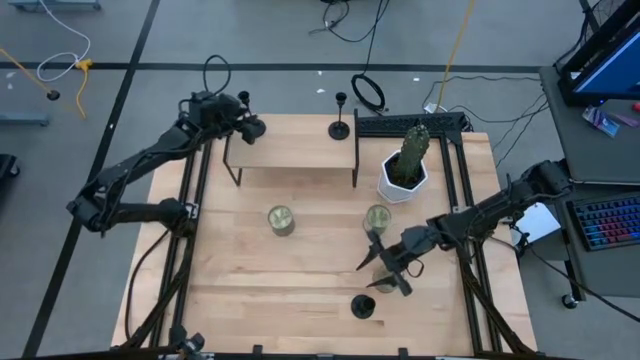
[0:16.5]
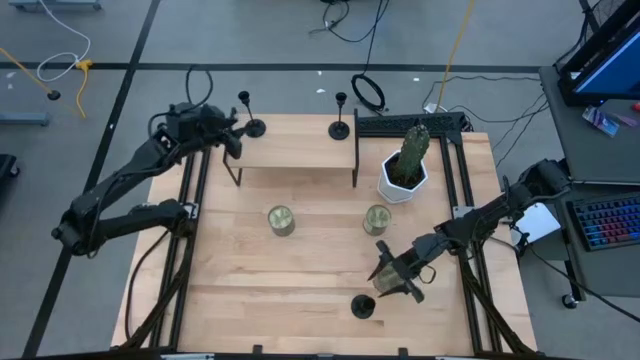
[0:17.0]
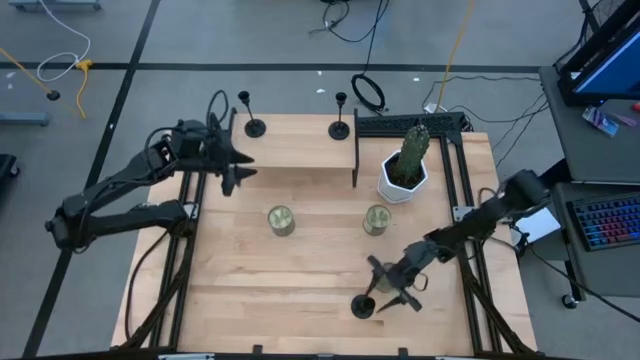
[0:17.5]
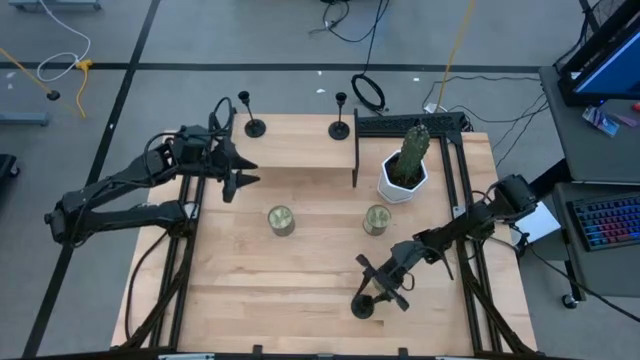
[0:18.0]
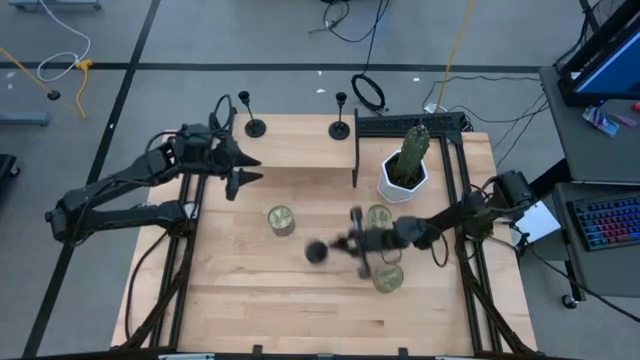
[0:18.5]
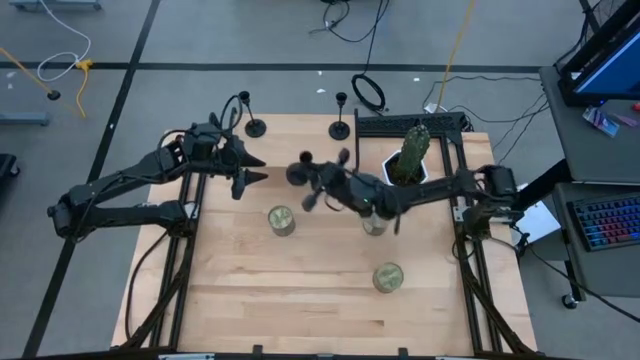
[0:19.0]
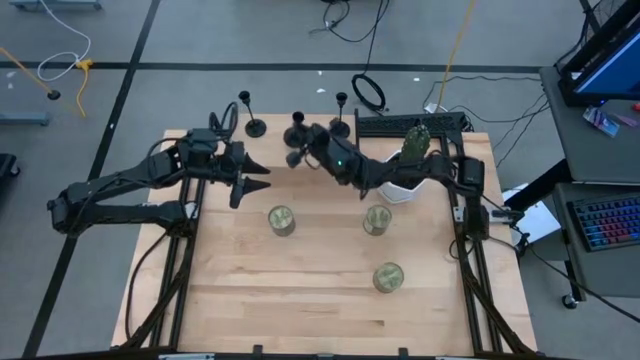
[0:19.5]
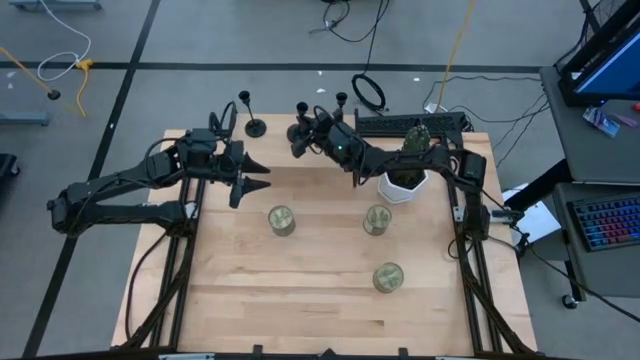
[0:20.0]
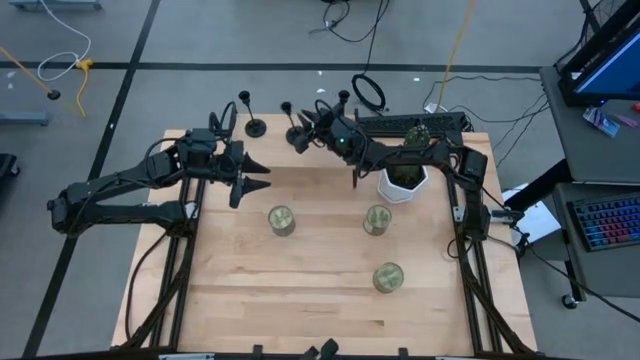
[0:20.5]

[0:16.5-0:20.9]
Task: Pick & Place candle stick holders
Put the black candle holder on the shelf

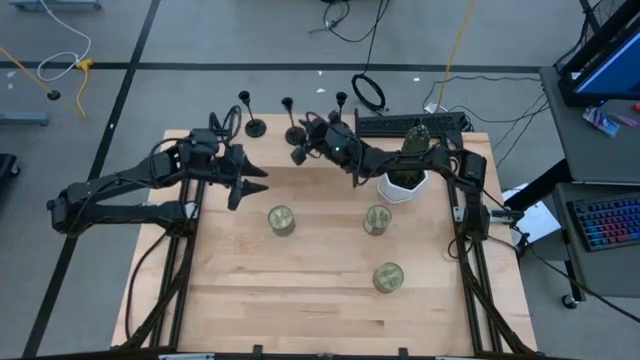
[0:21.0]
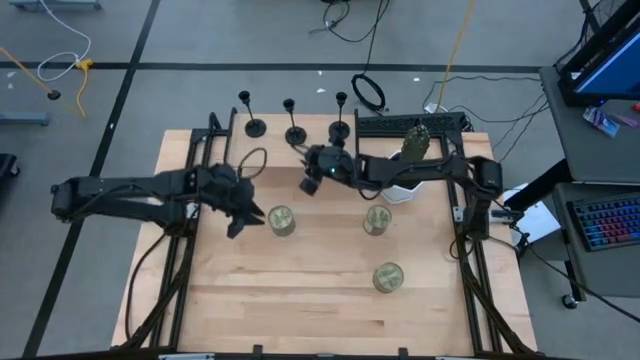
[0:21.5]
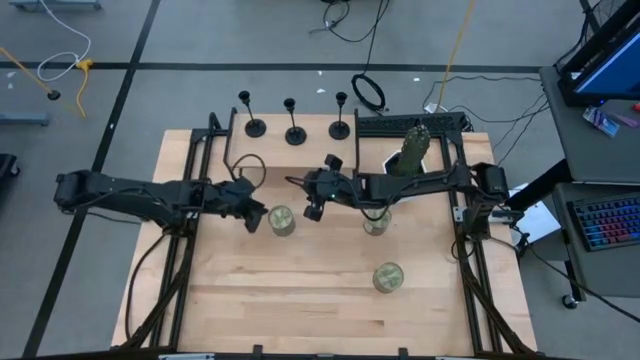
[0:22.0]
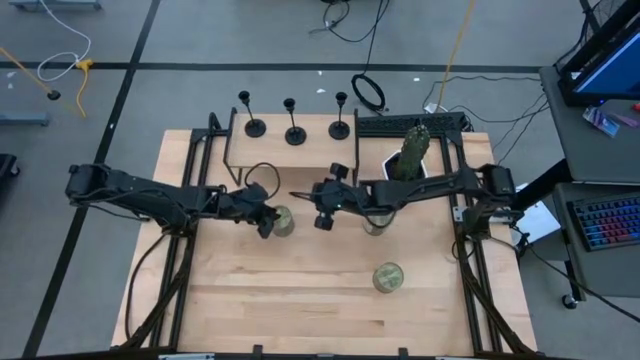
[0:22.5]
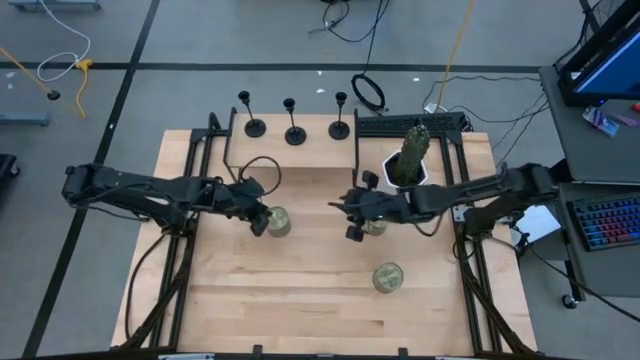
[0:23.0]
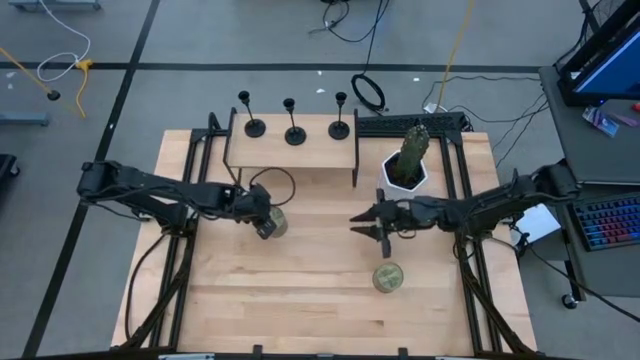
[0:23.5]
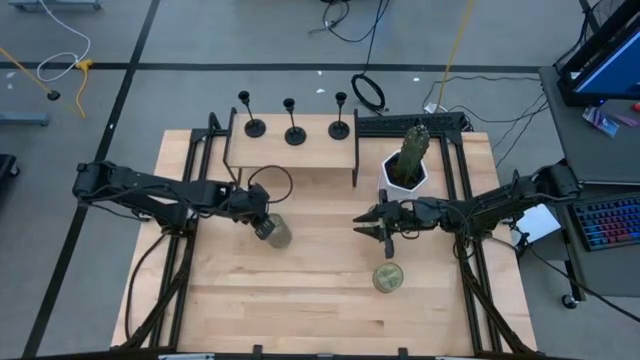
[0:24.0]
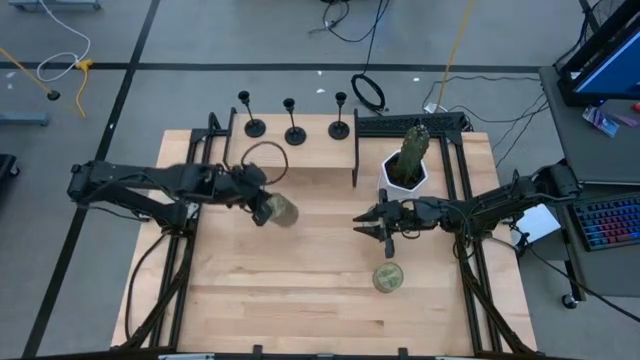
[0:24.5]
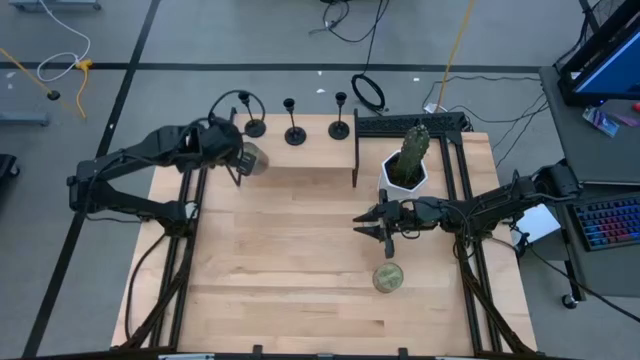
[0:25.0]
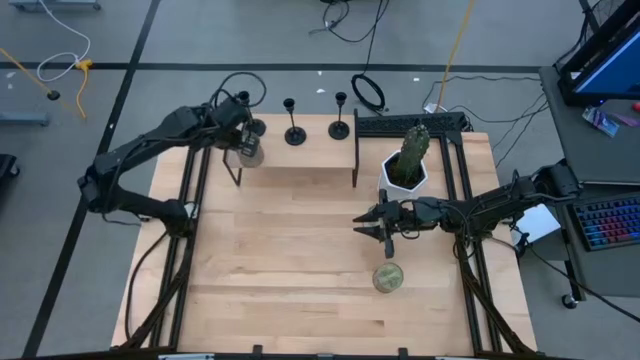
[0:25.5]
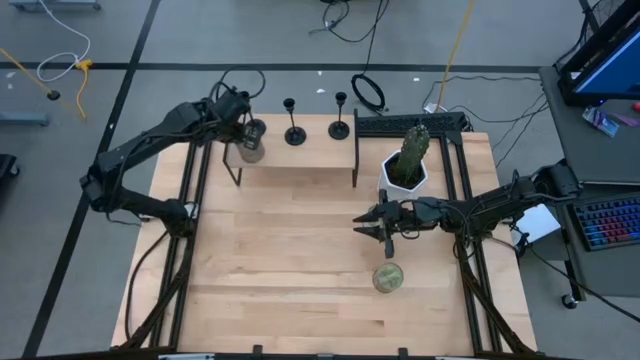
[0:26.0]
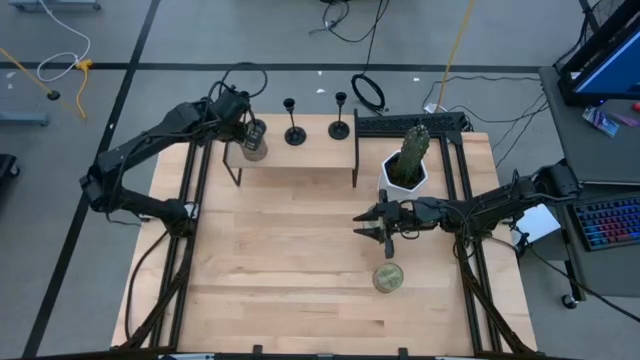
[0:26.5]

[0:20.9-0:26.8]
Put the scented candle on the shelf

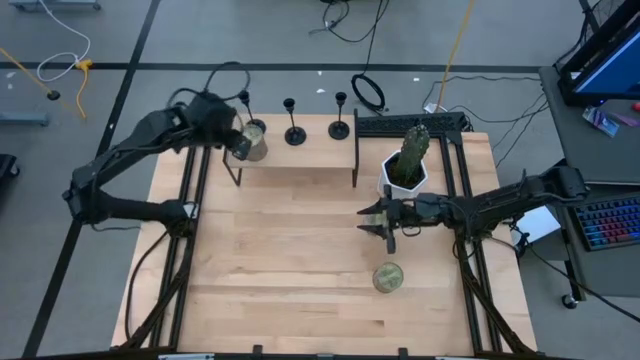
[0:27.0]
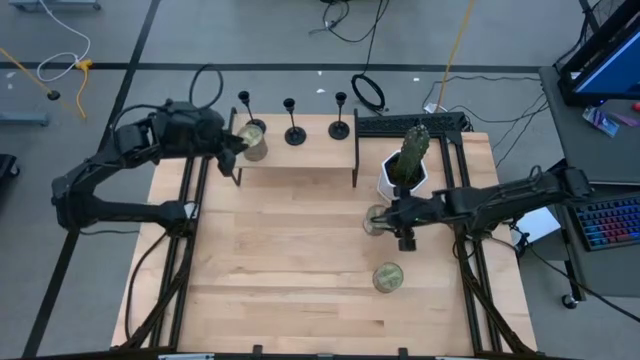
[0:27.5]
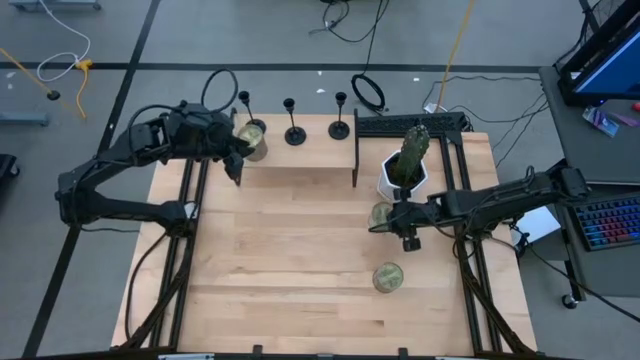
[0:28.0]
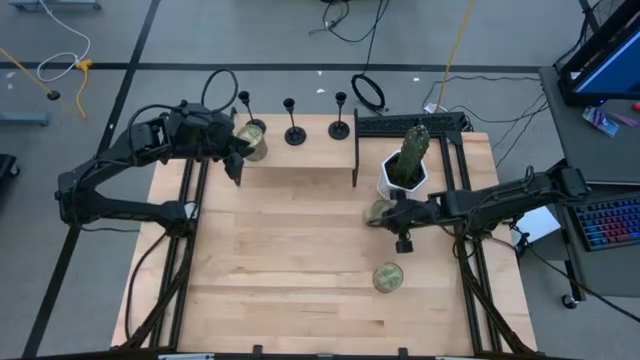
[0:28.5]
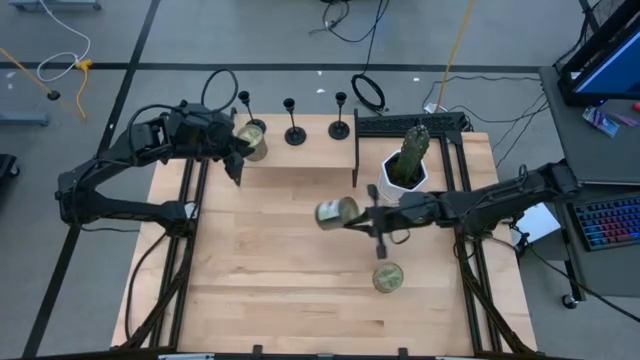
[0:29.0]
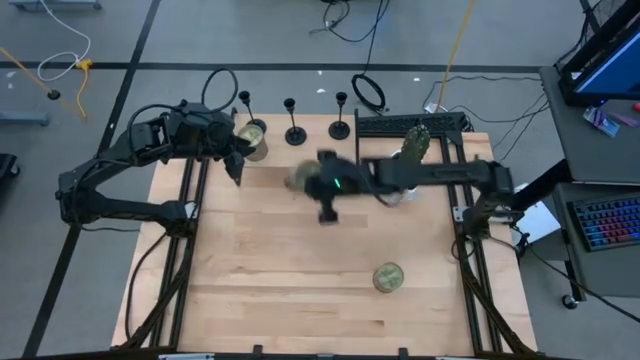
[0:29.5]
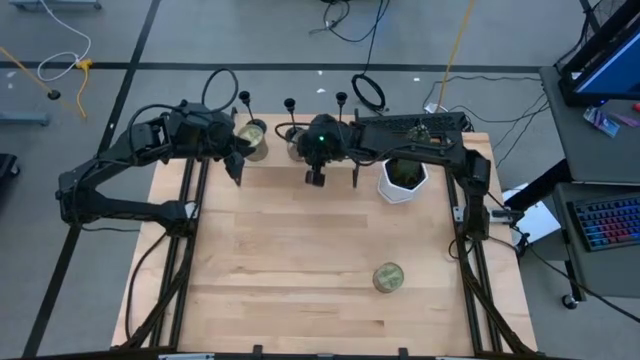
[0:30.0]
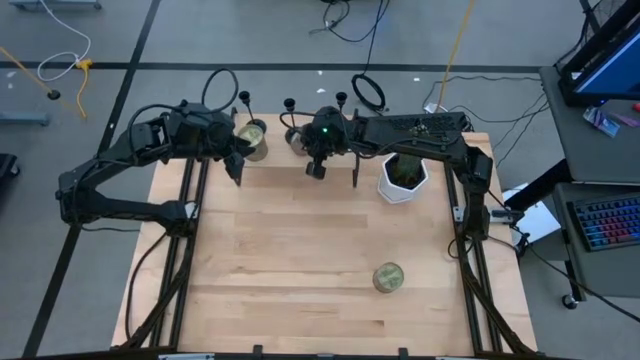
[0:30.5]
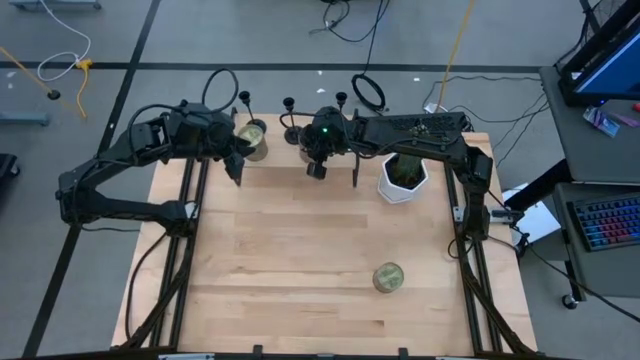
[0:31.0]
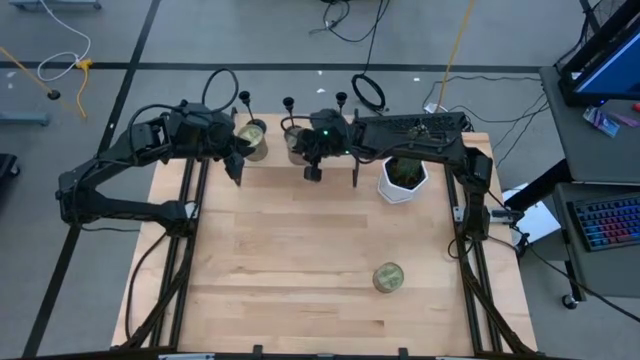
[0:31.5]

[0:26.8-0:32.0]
Put the scented candle on the shelf

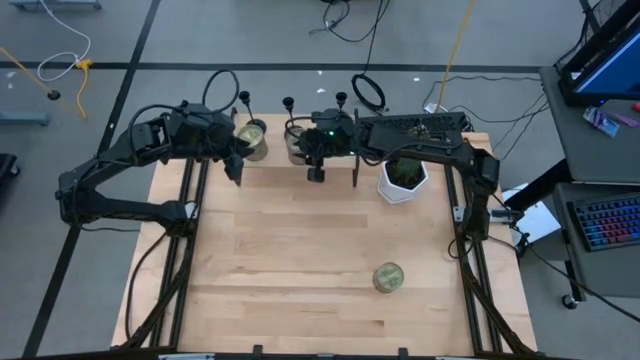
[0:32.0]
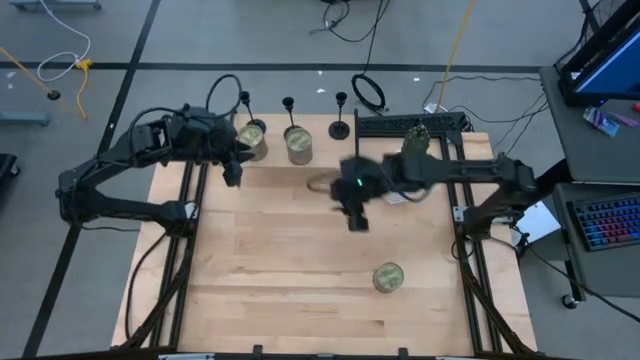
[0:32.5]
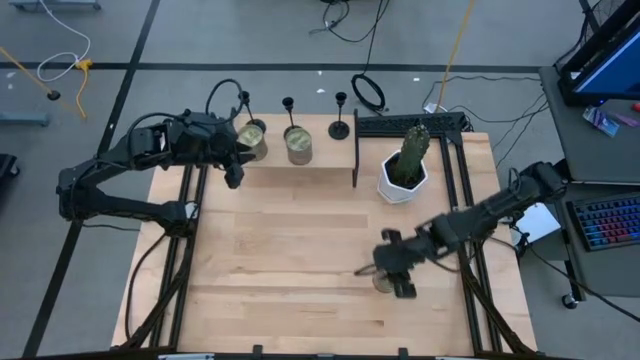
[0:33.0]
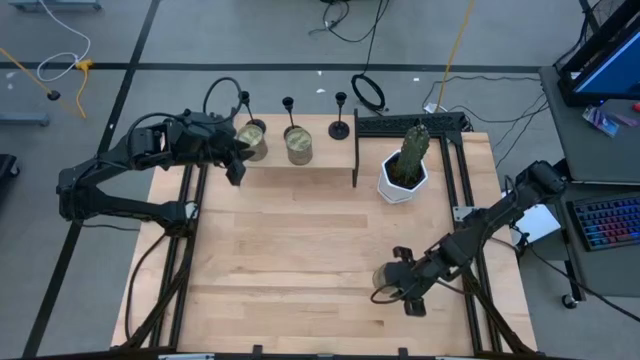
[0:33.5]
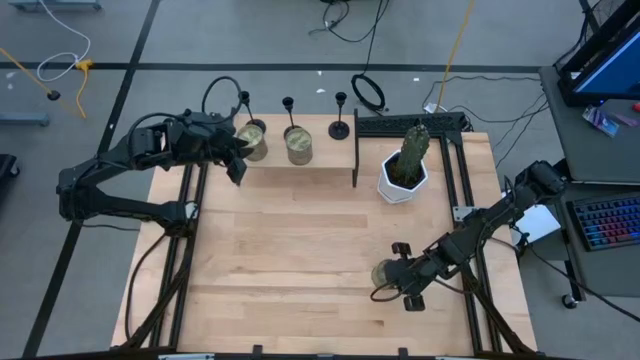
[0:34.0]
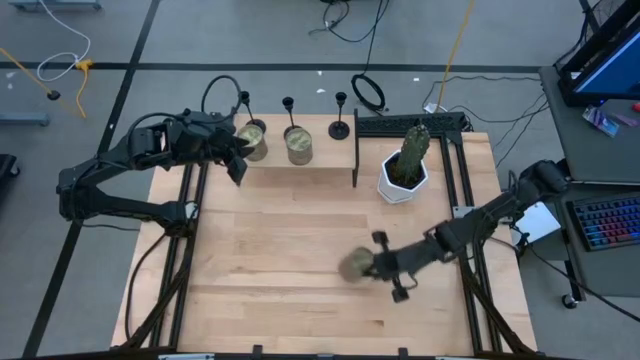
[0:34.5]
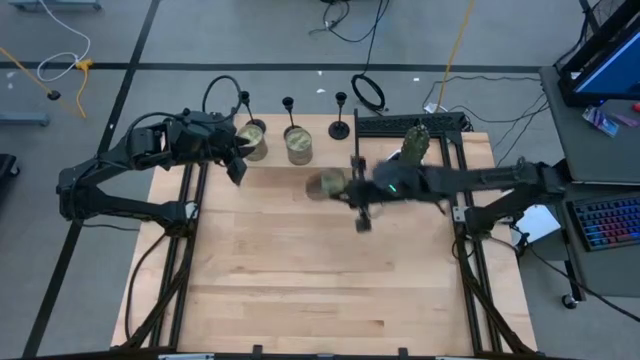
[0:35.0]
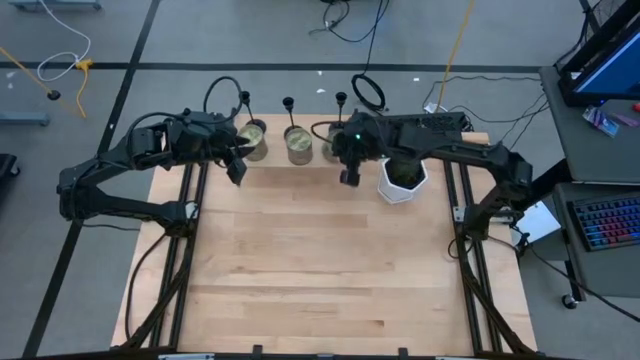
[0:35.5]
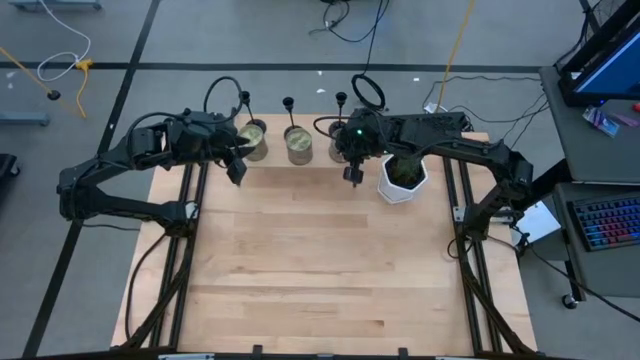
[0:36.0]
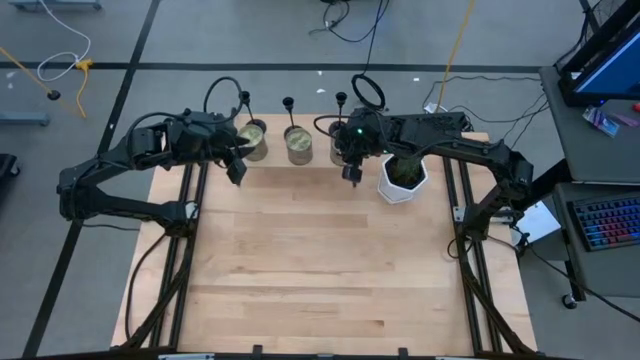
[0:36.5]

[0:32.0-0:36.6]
Put the scented candle on the shelf
